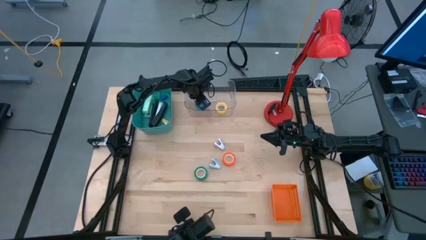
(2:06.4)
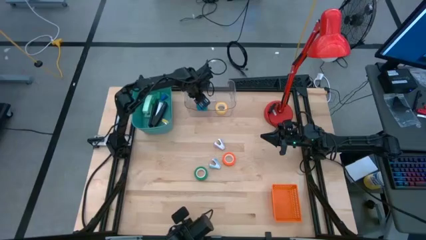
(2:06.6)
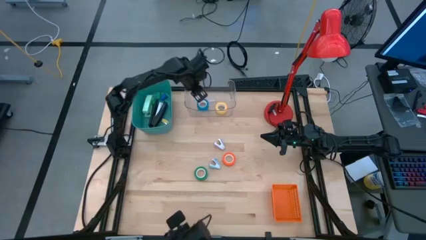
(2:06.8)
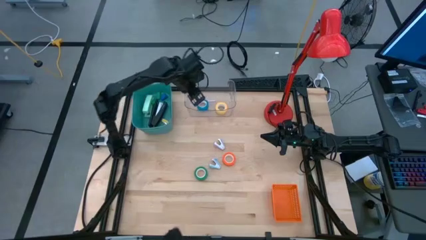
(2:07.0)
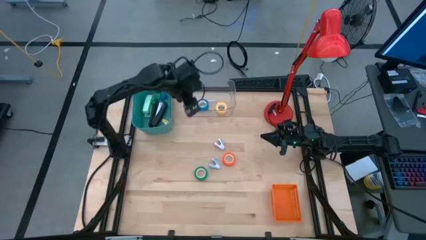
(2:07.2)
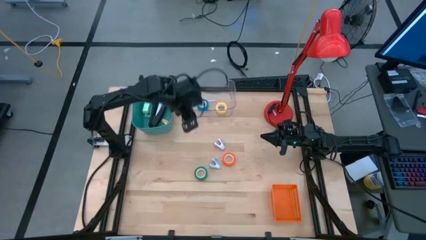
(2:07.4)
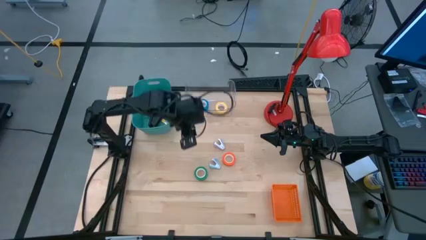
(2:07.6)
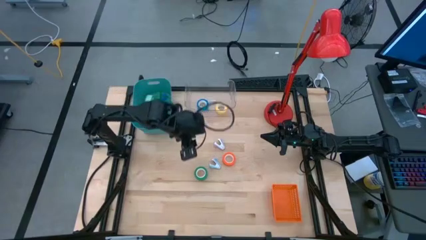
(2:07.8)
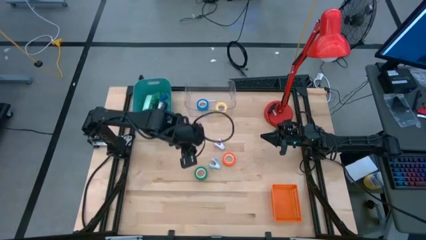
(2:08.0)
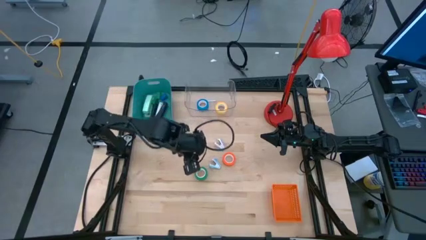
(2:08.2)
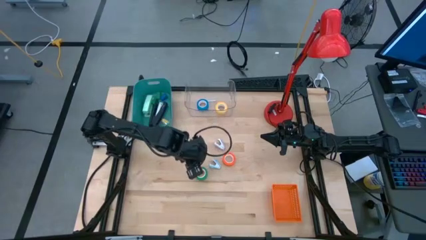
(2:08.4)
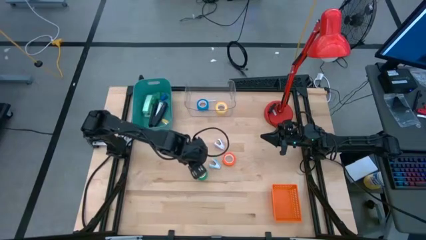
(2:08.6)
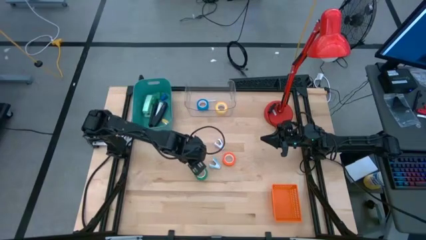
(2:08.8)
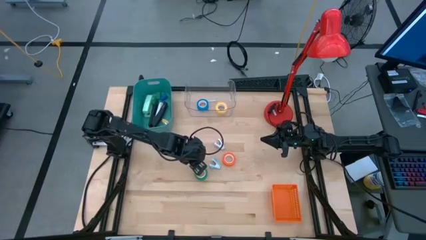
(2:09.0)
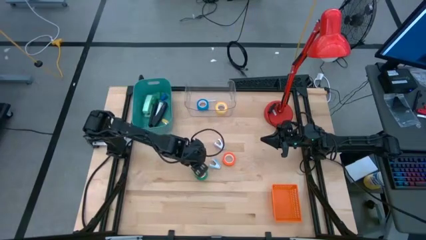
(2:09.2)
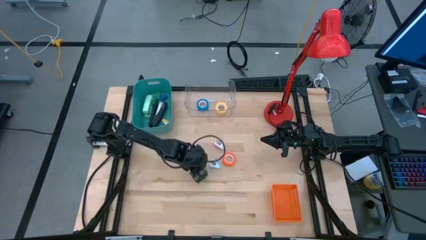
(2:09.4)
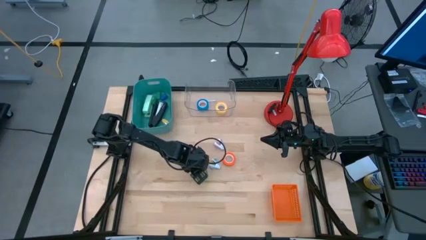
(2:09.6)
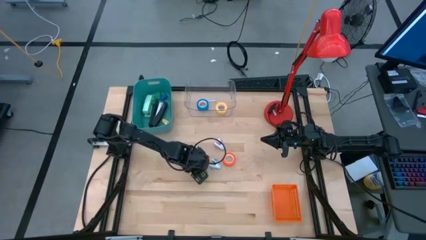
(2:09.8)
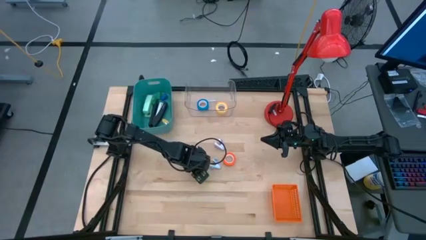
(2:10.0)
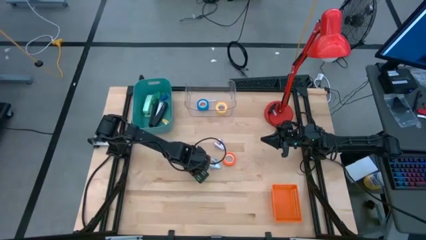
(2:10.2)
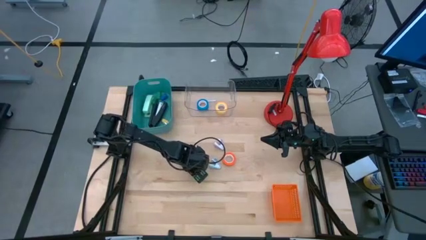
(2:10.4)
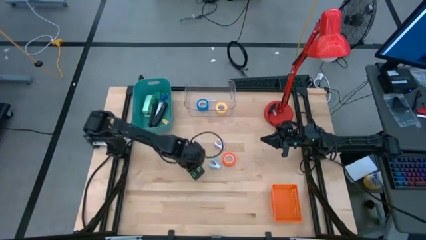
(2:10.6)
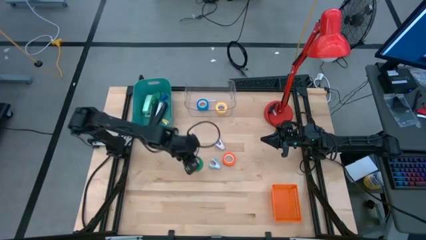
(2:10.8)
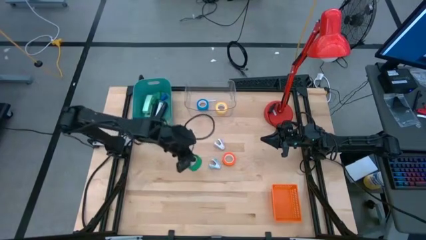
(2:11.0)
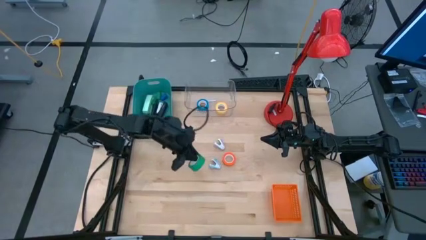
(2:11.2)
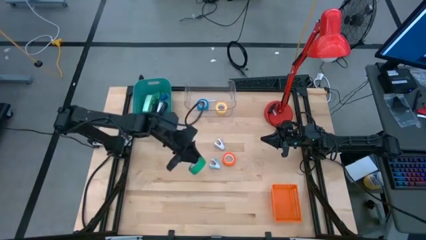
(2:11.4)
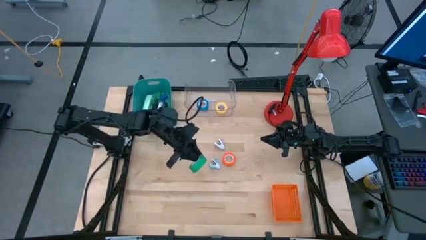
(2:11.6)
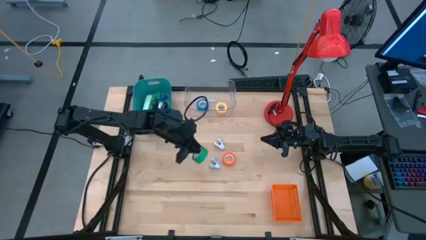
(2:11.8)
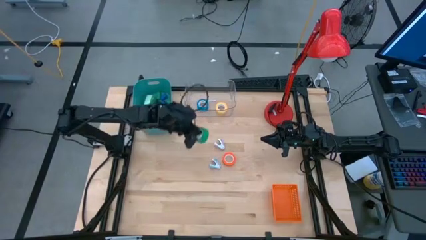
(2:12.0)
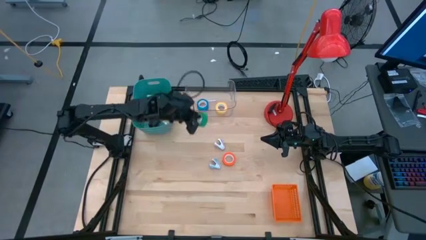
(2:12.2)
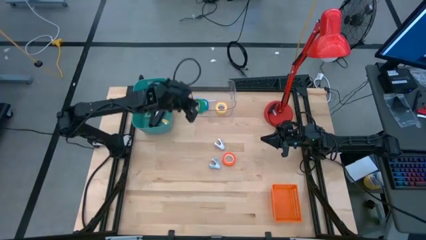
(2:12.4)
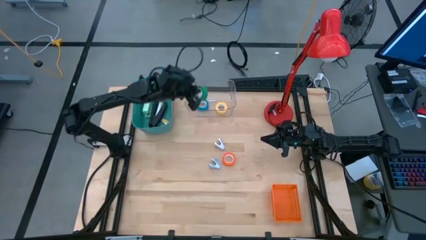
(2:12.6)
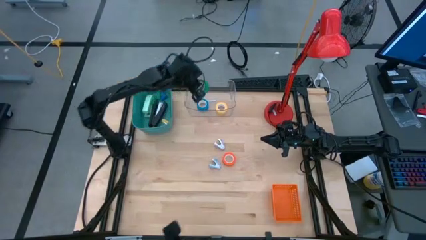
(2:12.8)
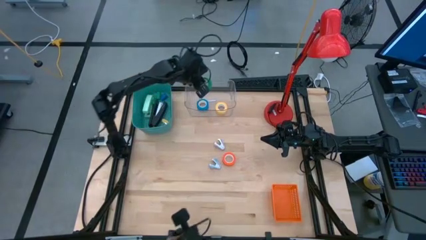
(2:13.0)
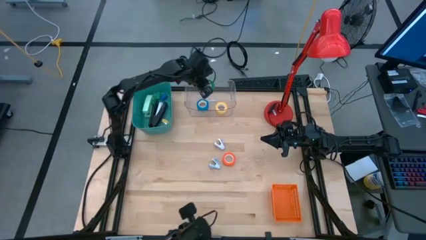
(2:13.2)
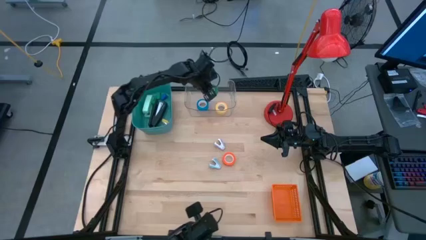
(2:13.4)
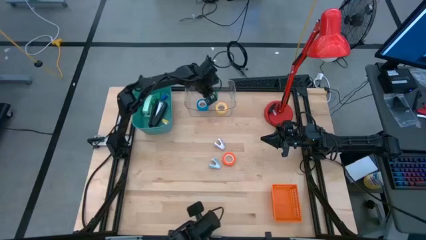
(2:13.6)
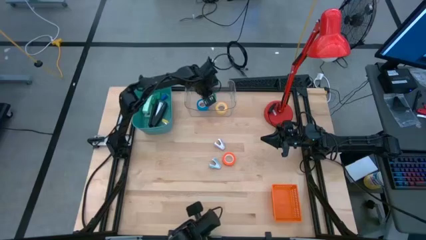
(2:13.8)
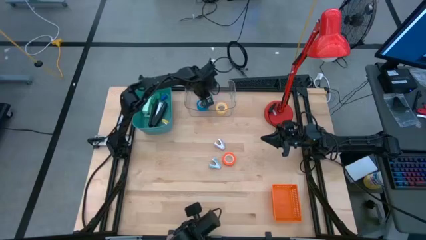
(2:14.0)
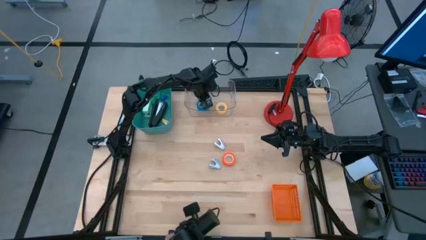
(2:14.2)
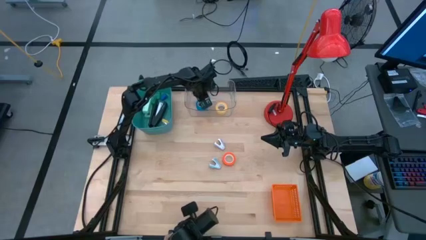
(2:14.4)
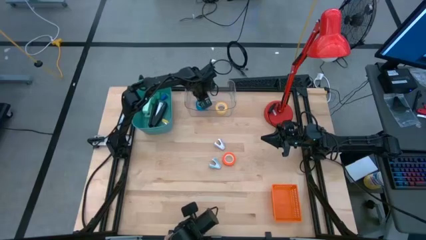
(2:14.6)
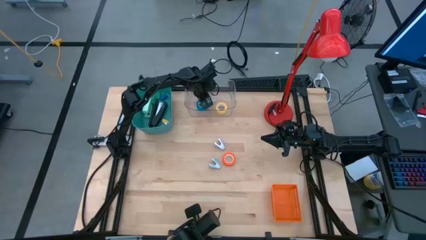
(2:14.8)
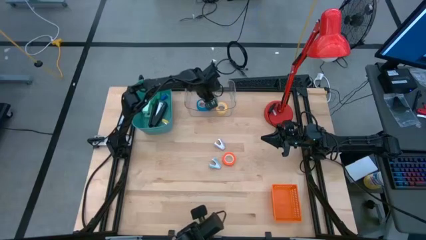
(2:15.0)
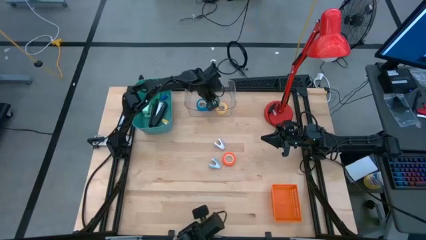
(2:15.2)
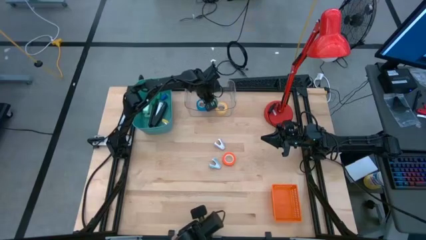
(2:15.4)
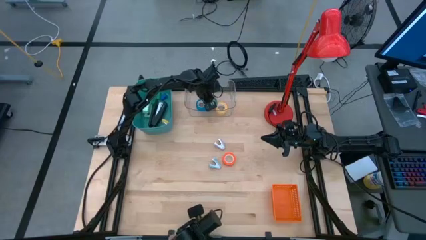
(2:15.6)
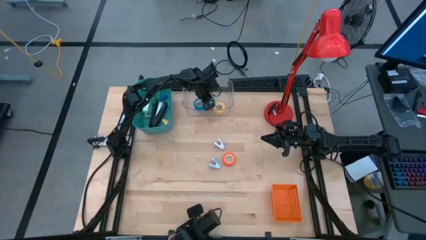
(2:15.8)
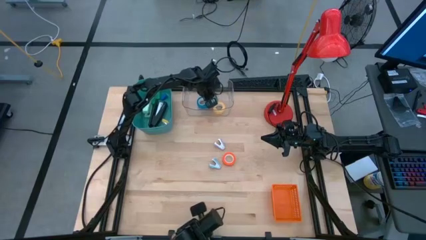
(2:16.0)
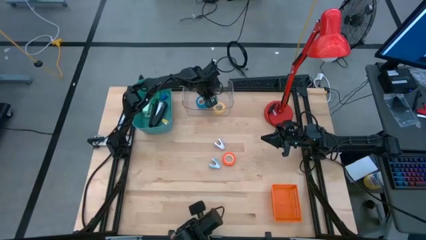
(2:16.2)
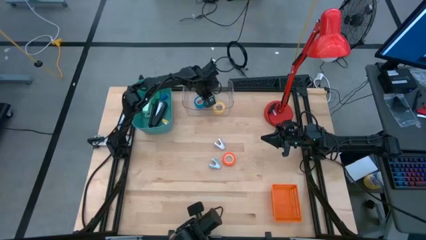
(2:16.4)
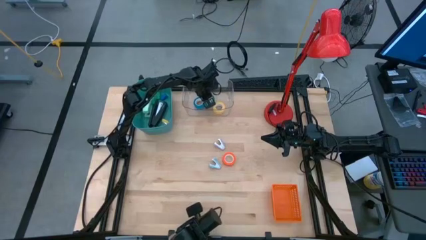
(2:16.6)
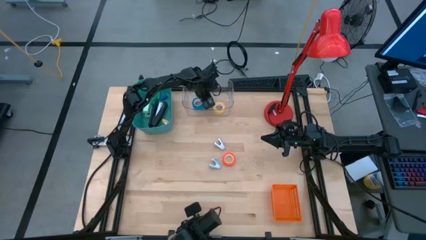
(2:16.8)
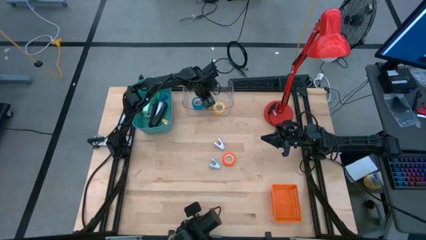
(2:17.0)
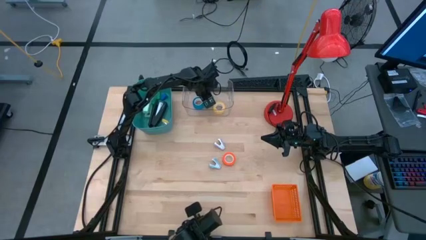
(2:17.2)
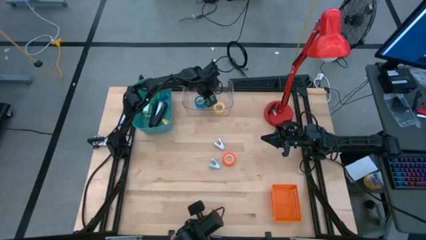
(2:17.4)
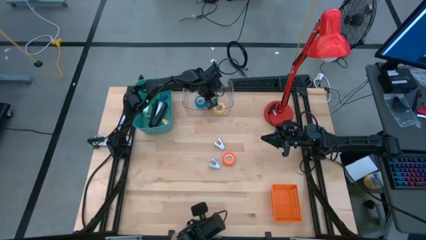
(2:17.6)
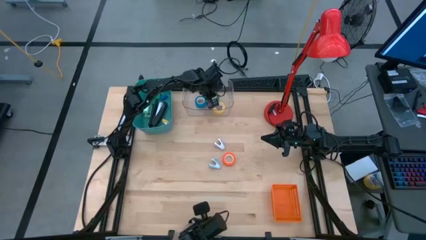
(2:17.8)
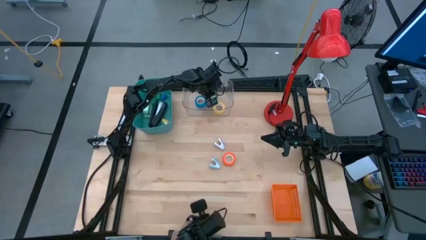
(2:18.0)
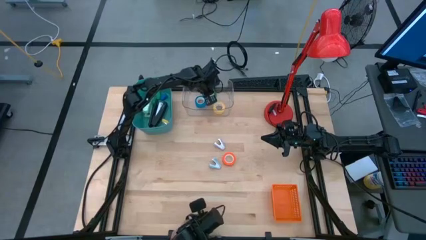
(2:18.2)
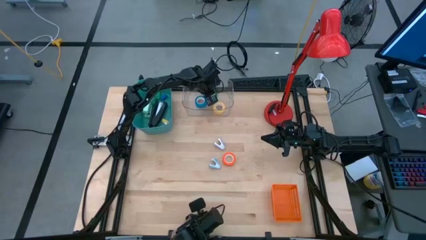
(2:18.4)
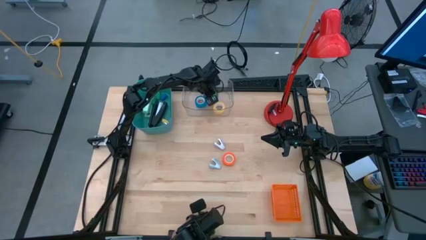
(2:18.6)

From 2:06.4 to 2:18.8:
Task: Pick and place Stapler, Stapler remover, tape
Put the green tape into the transparent bin
